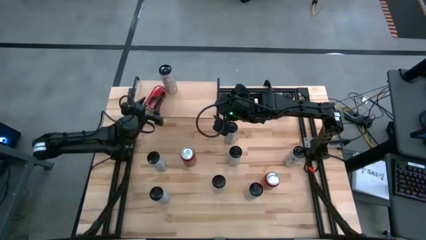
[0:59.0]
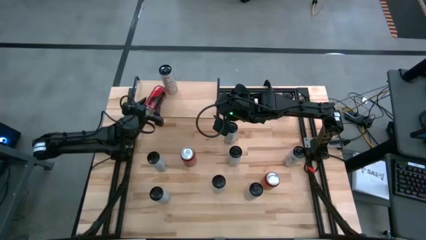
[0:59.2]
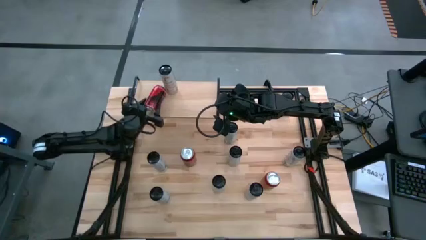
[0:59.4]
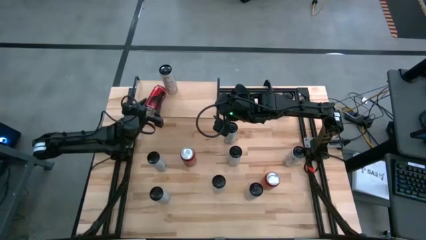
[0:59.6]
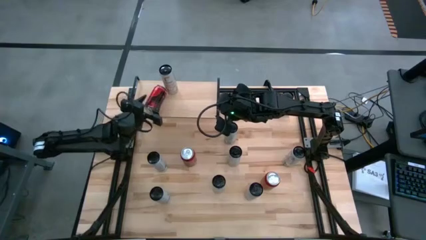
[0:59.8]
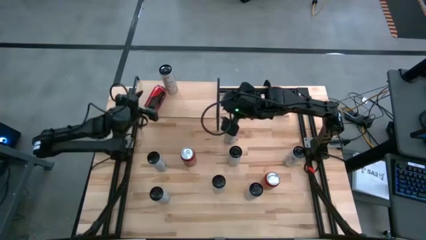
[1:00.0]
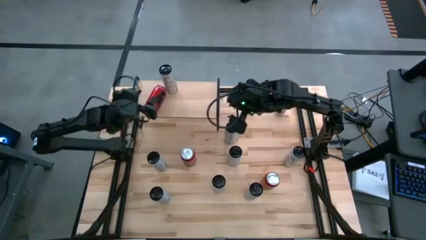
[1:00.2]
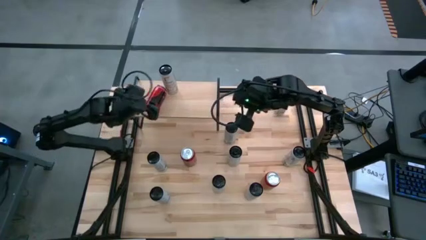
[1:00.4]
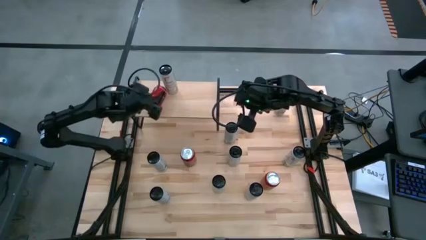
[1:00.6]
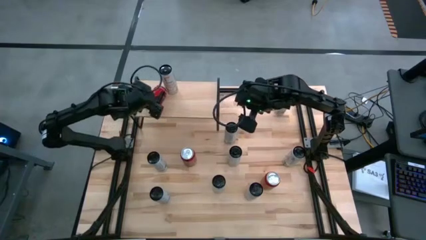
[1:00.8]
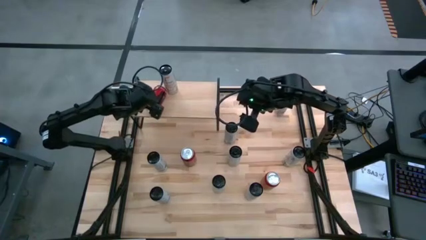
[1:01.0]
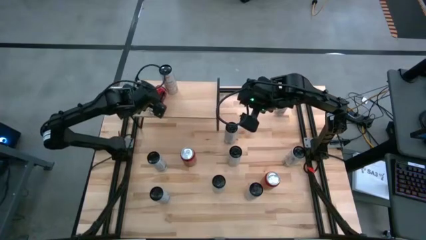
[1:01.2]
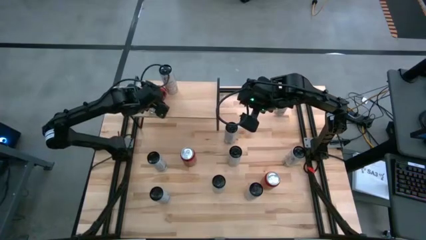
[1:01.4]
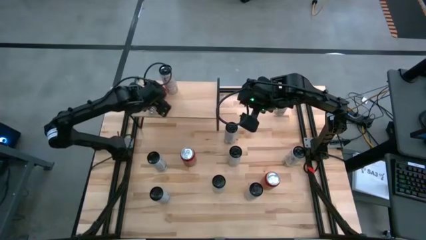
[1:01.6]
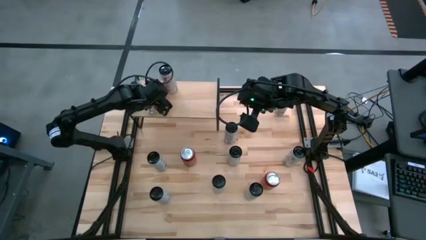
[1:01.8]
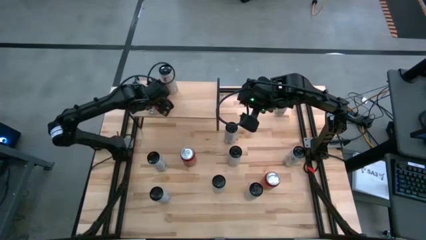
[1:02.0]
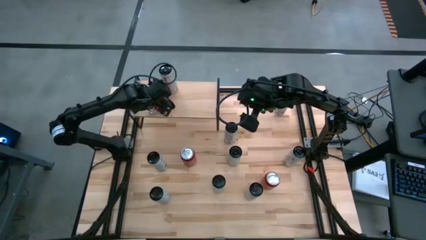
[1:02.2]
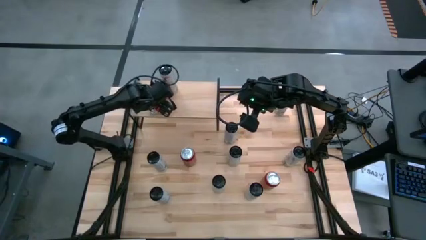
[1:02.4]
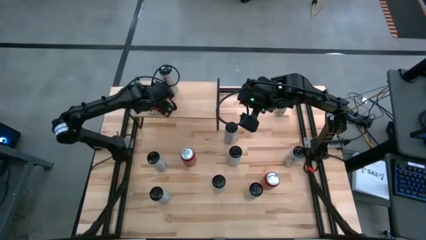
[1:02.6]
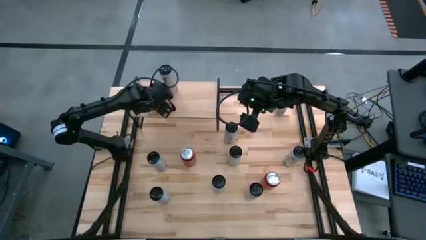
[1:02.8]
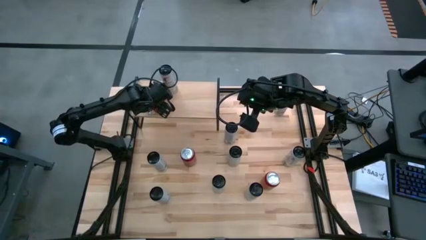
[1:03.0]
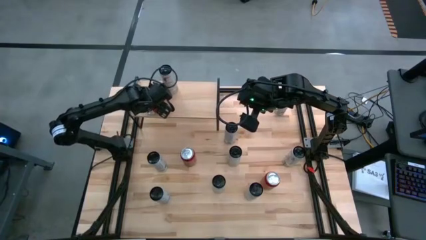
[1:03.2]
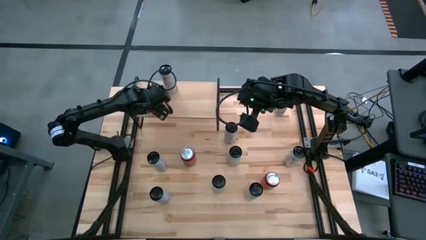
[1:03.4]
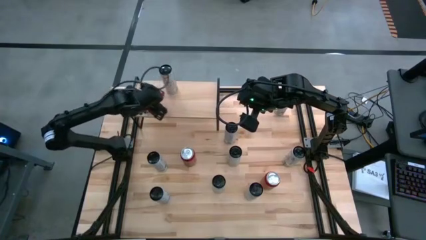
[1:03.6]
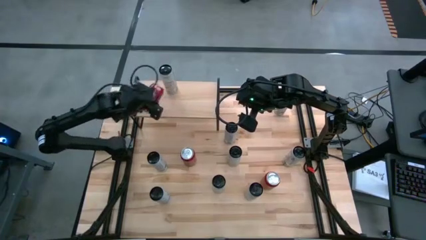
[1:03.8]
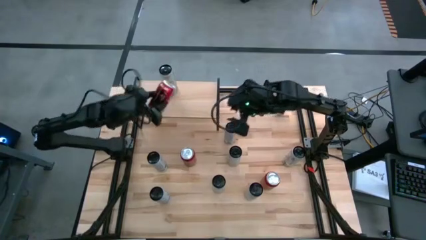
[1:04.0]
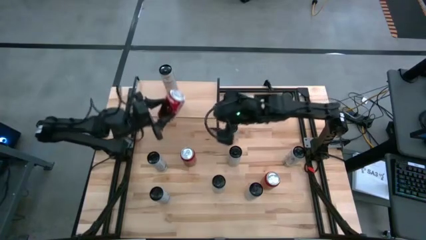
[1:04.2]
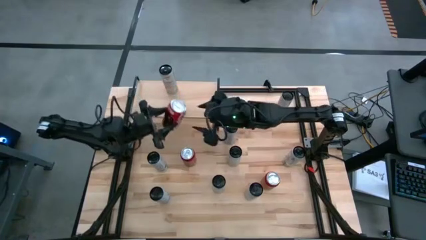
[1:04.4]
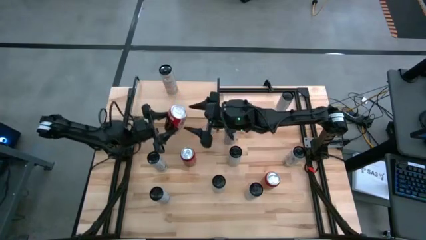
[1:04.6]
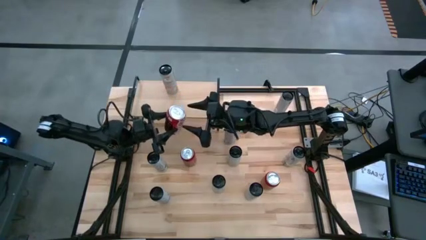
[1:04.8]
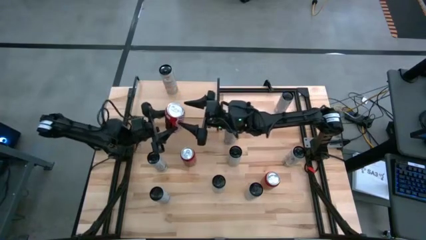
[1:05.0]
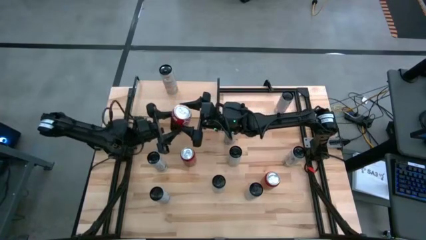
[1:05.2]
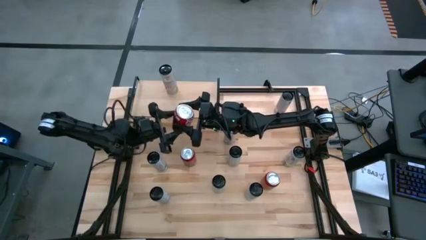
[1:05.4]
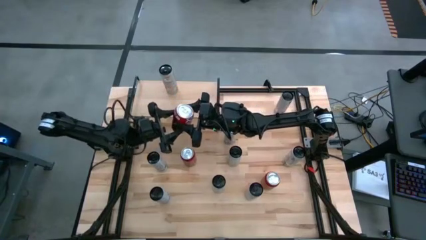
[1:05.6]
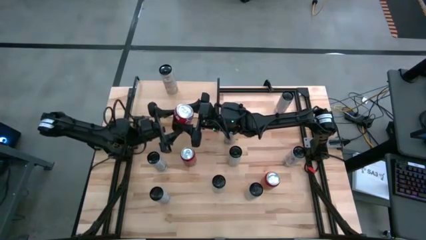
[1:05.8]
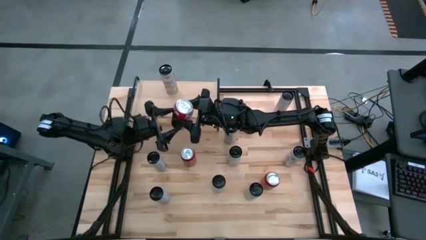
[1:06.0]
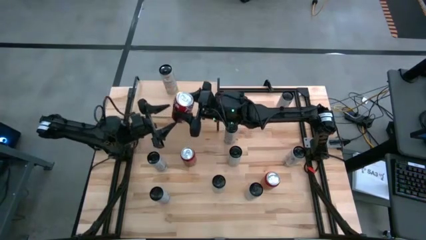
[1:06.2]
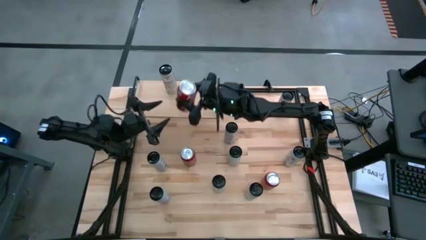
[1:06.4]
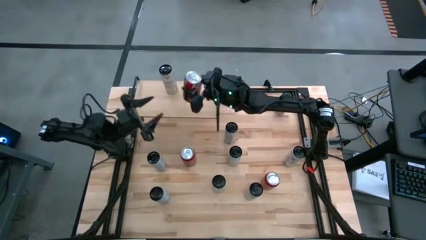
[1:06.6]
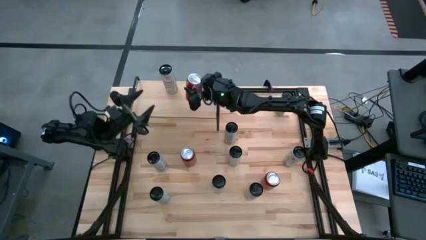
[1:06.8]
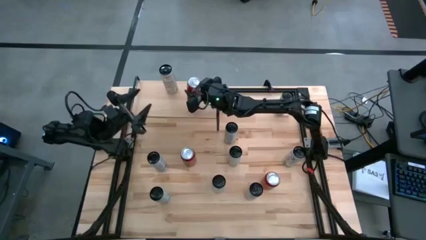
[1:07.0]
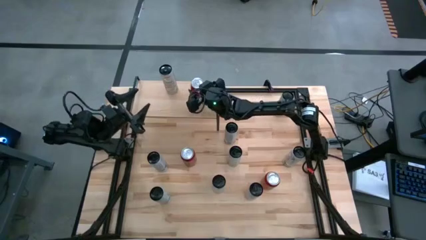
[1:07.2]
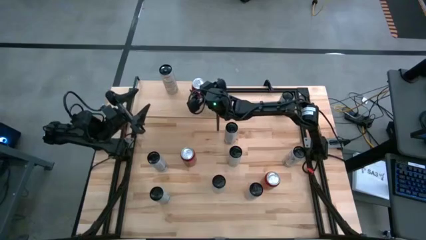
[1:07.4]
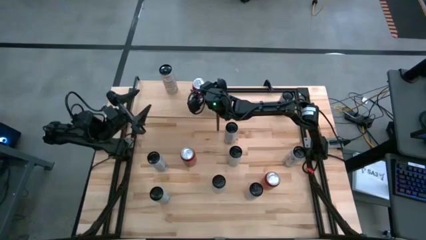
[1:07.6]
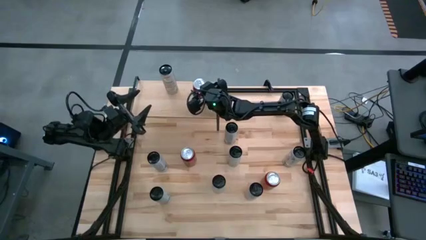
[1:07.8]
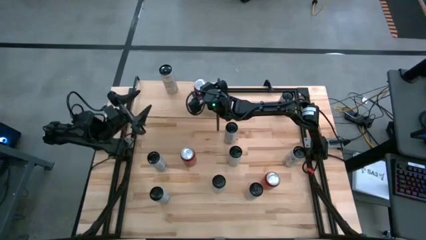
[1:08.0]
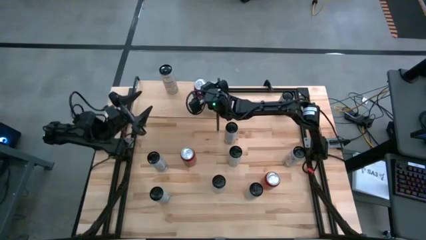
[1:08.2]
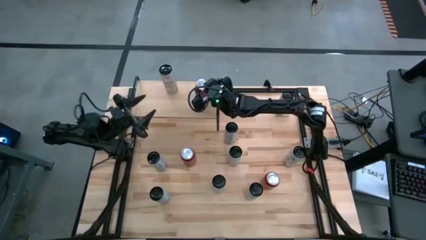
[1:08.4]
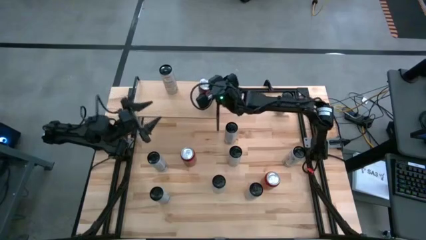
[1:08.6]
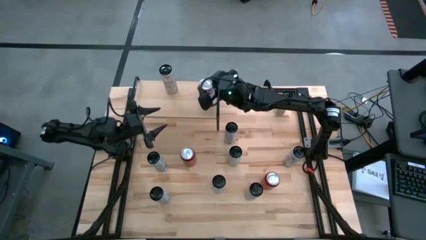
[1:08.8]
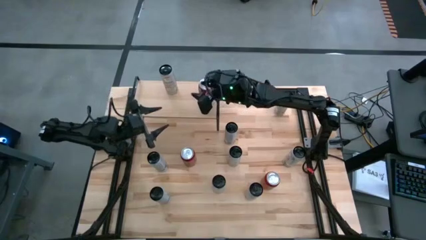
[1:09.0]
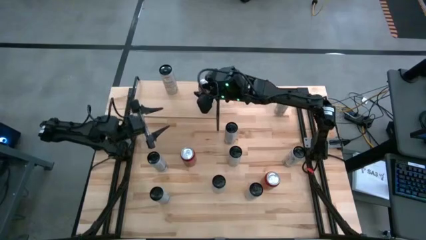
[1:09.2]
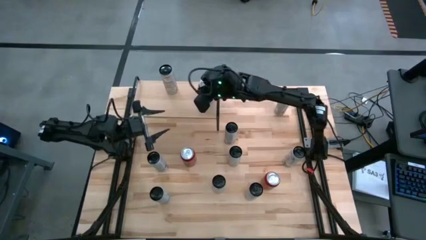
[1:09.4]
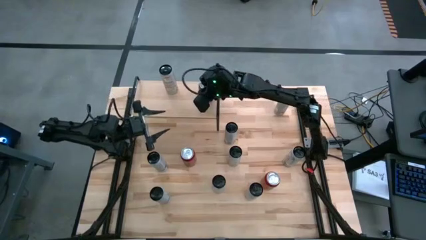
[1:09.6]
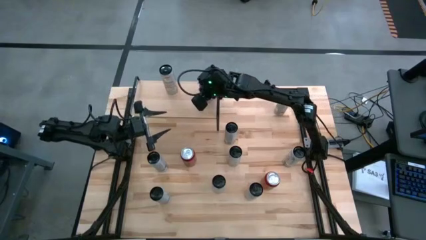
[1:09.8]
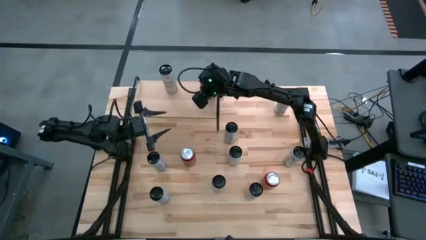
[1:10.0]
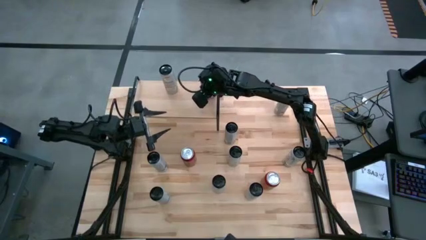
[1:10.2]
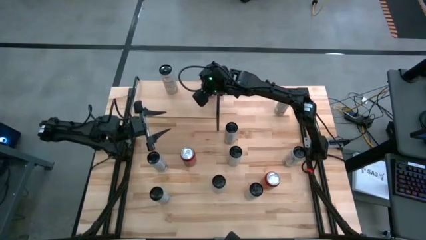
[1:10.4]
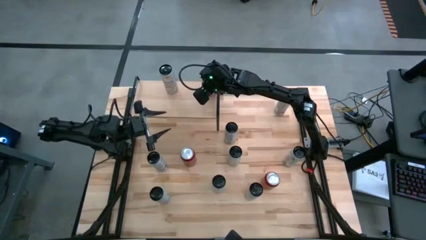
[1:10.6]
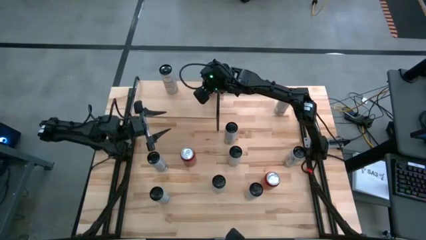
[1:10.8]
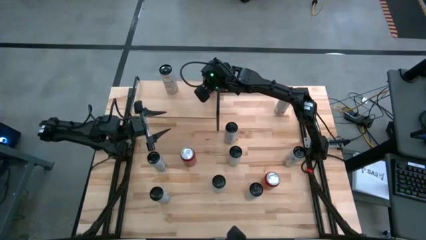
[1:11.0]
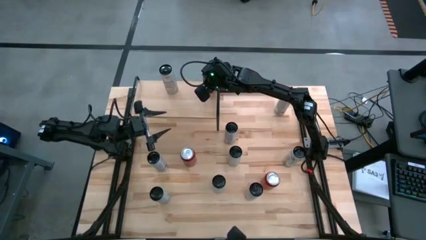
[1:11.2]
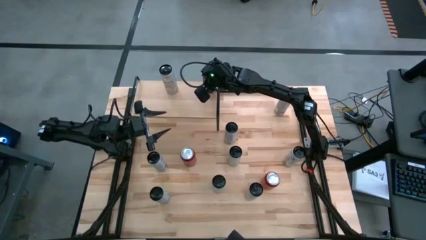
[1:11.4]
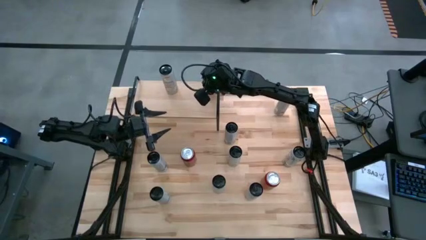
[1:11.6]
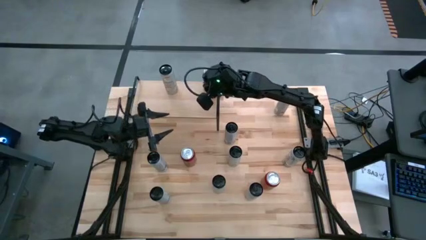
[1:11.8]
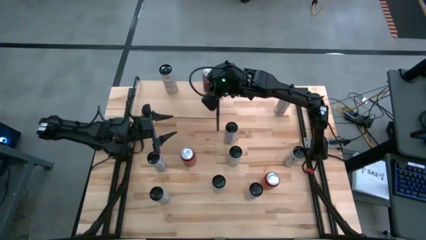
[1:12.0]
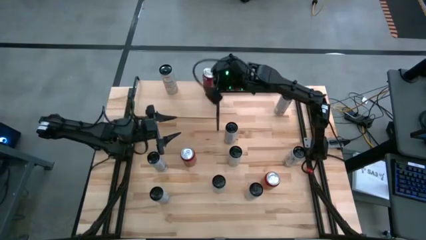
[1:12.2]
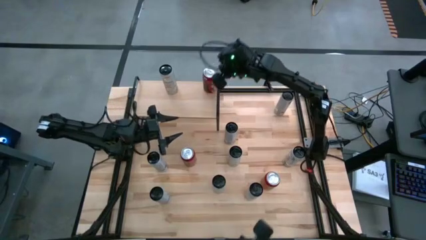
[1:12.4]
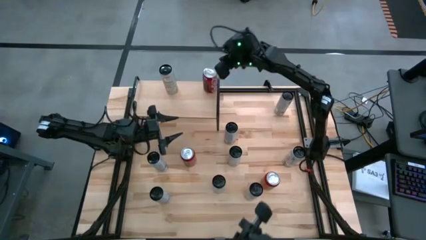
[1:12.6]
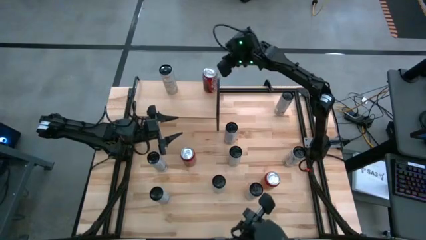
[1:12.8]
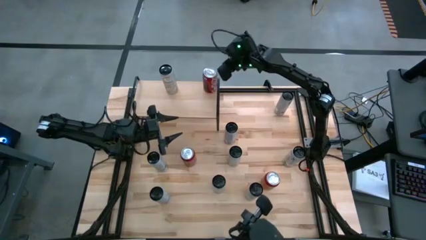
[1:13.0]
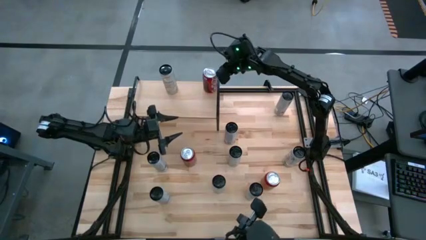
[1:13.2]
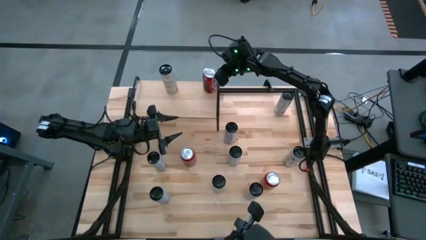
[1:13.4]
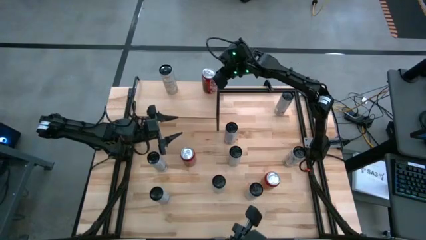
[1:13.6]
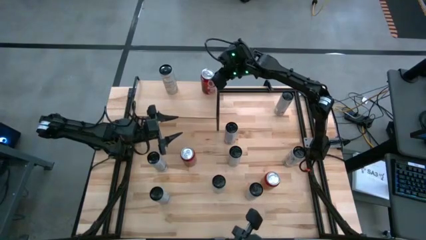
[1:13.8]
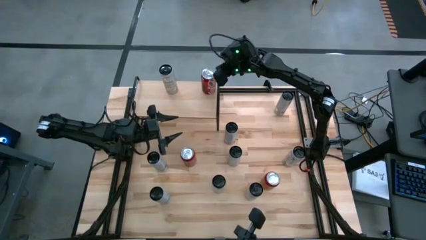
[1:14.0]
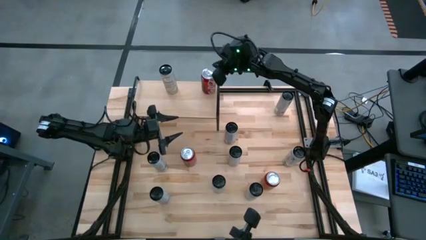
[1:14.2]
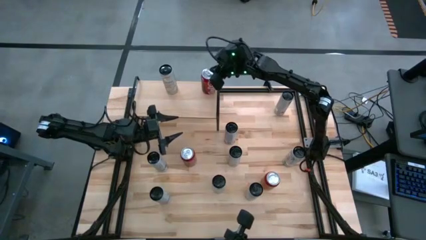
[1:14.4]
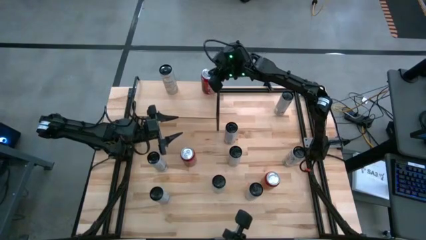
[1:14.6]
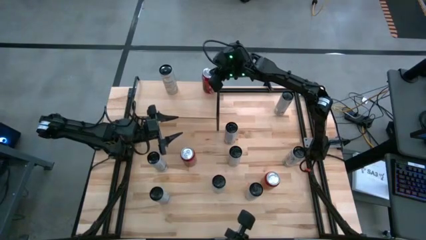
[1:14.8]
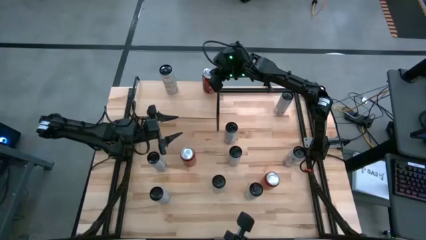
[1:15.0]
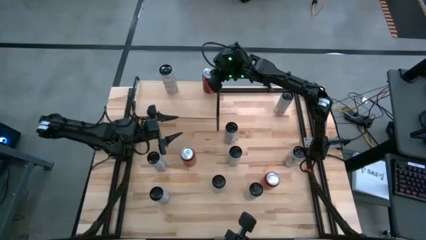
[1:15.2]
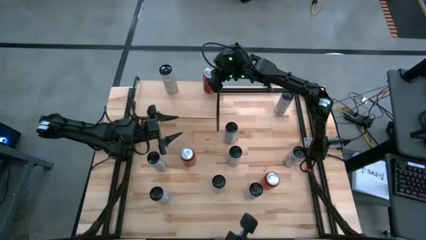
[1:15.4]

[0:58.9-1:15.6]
Task: Place canned beverage on shelf
Put the top right red soda can on the shelf
